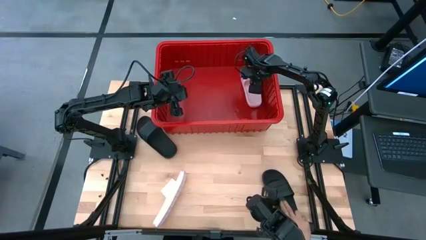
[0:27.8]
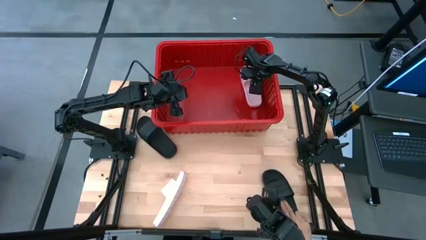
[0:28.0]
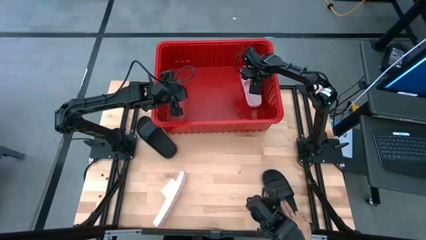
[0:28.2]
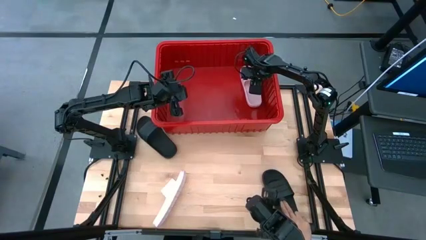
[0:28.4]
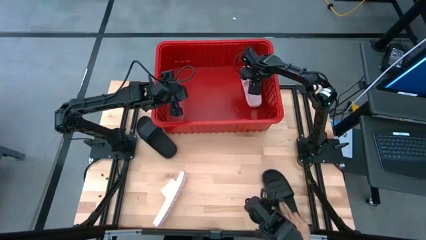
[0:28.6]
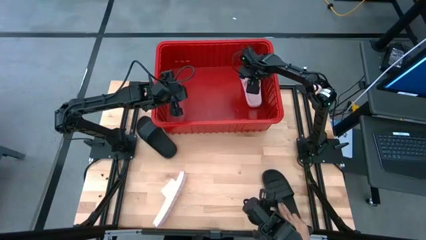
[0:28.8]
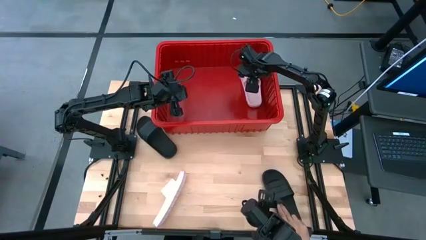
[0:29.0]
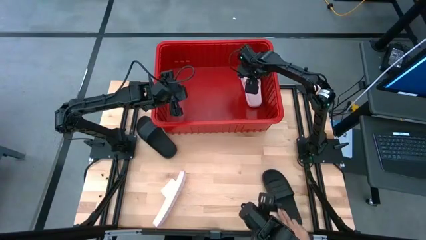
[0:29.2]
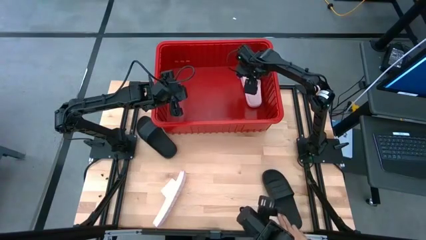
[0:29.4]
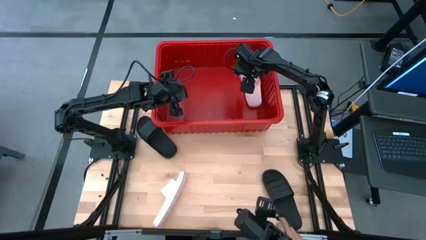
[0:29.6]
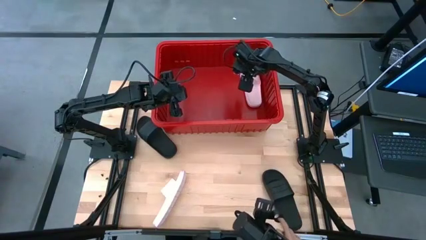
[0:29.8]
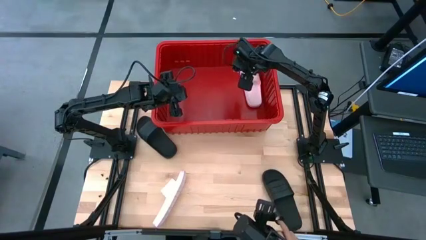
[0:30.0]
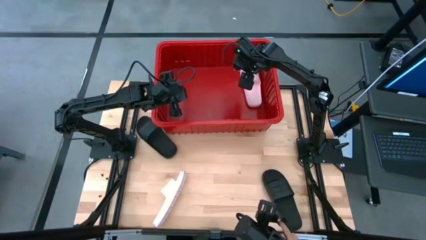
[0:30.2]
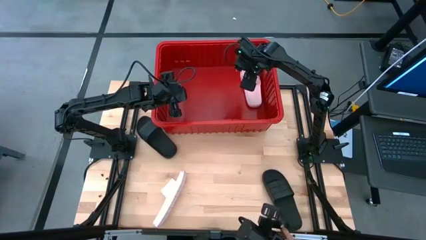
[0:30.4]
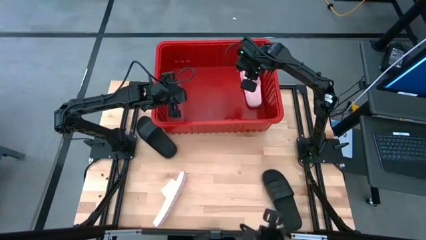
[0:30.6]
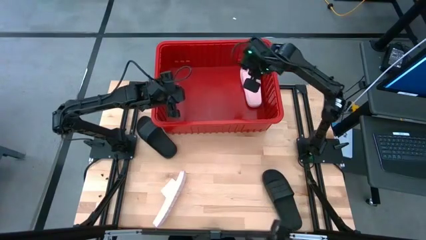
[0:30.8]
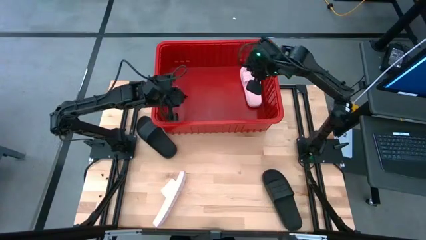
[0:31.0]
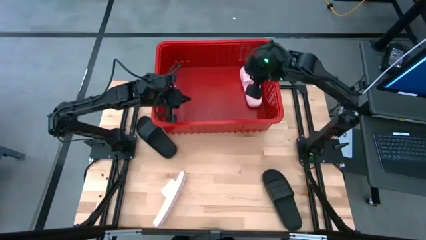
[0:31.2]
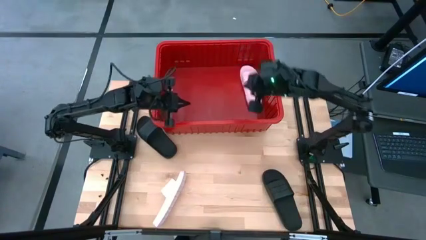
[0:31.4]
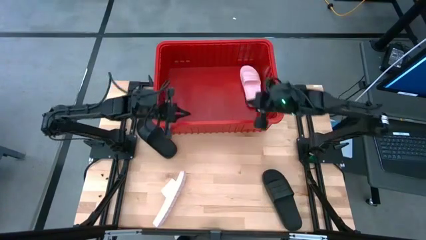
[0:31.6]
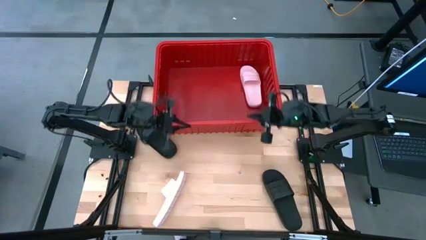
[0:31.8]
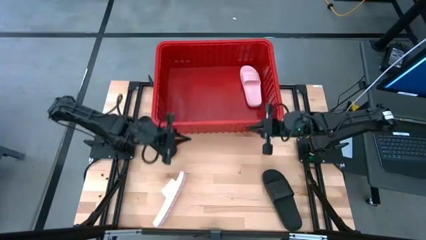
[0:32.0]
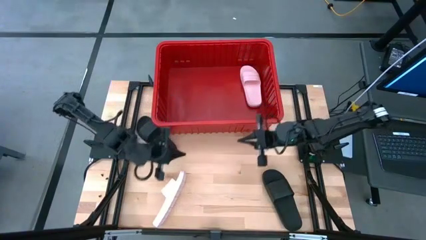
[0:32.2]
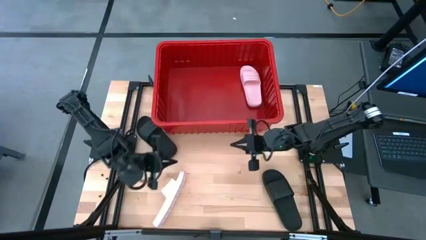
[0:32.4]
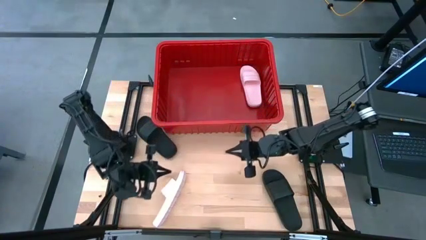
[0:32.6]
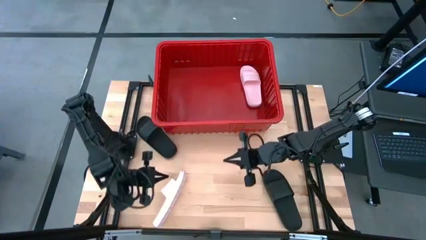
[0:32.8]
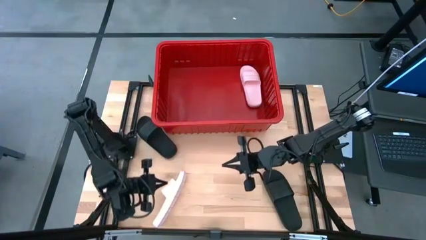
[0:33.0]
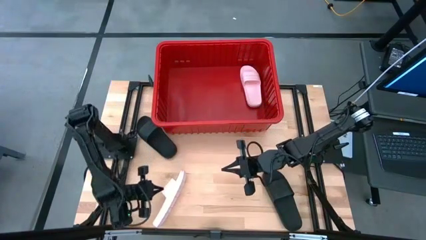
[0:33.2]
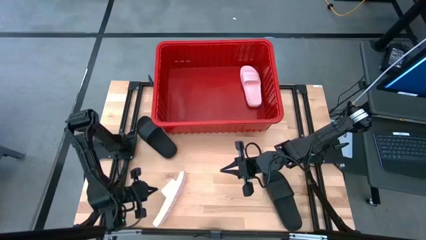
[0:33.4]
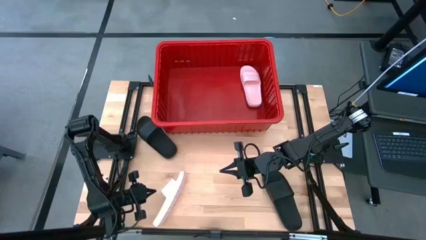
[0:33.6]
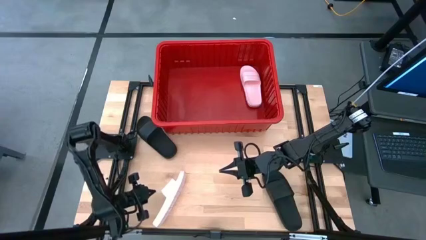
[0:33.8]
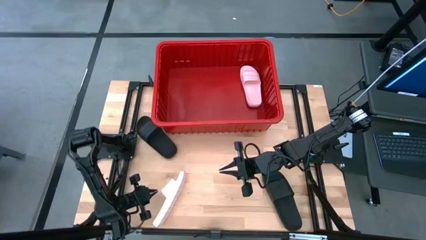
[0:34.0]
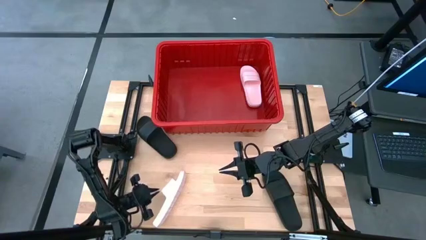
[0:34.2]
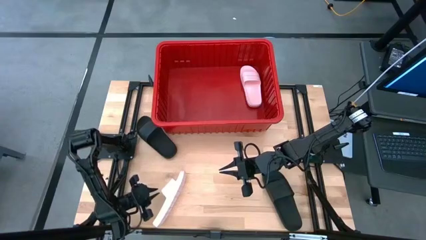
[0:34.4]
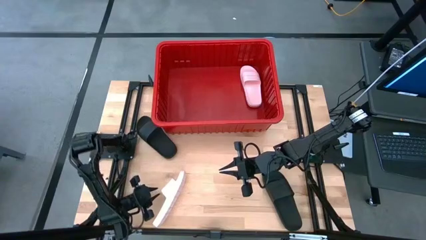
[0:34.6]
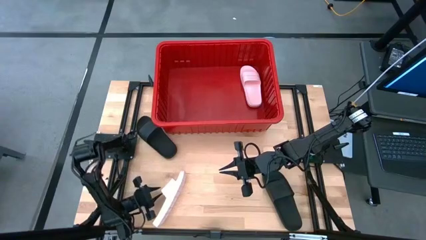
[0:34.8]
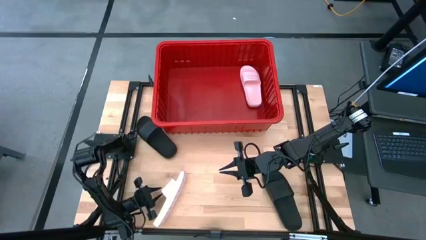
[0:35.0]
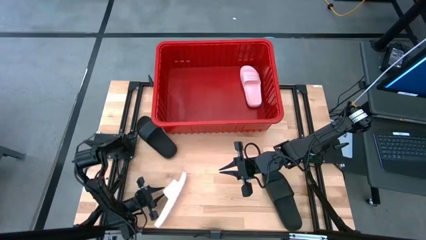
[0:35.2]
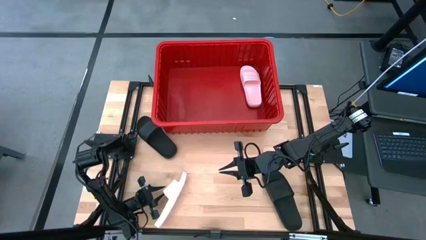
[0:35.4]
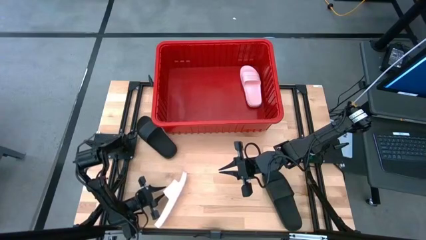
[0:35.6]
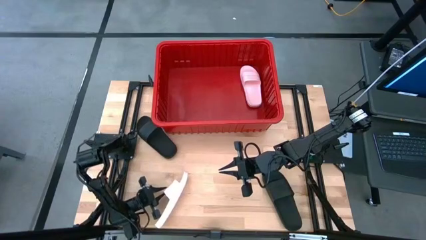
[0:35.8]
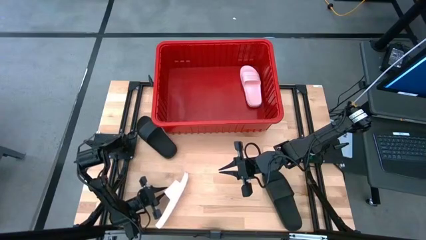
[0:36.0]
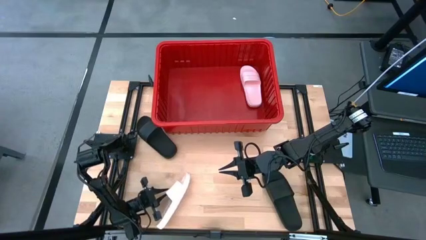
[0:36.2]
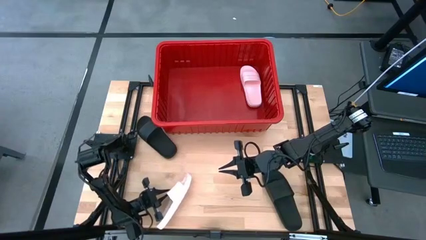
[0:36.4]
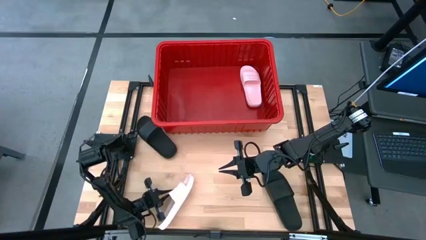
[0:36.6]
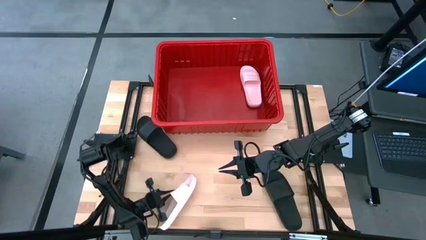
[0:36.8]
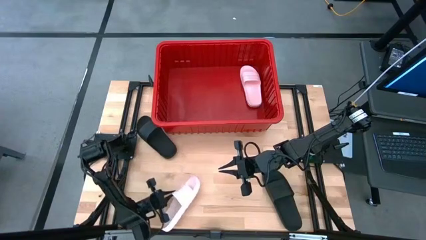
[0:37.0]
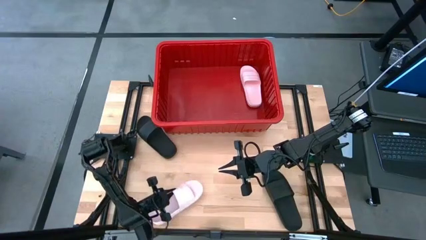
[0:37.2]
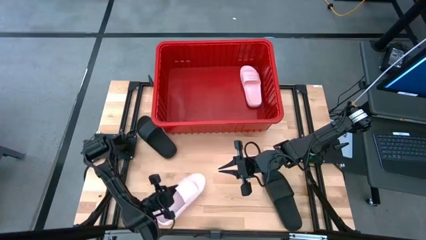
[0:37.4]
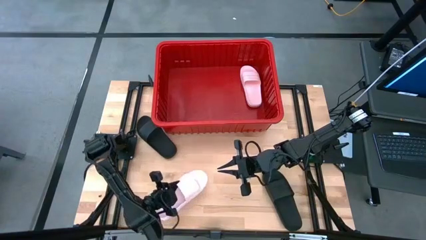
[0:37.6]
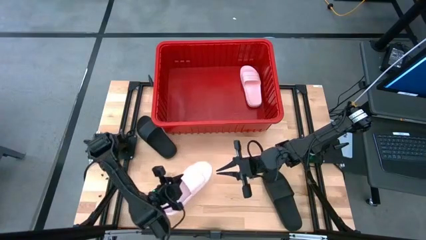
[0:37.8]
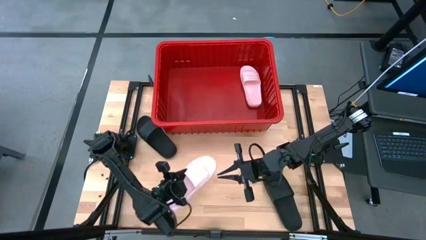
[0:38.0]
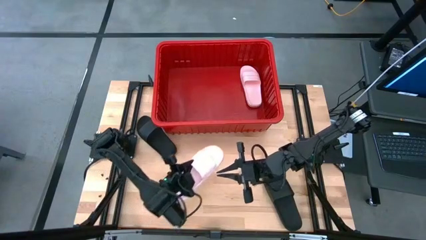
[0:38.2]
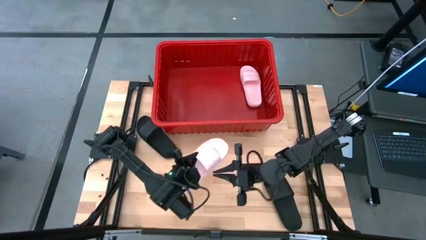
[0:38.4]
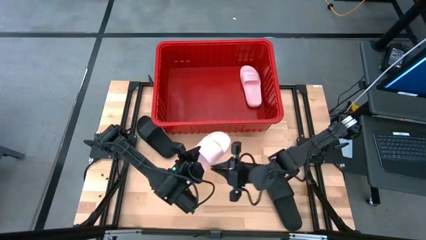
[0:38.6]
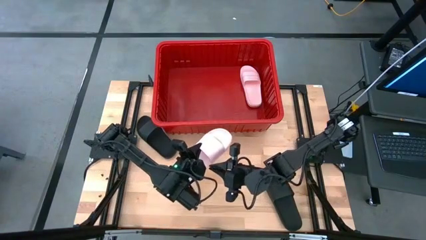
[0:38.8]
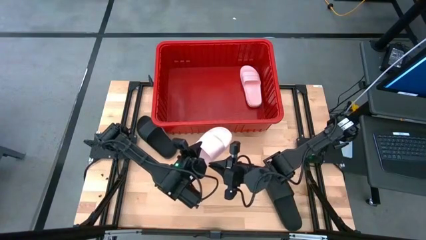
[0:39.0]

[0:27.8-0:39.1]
Task: Pick and place slides into bin
Put the pink slide into the red bin

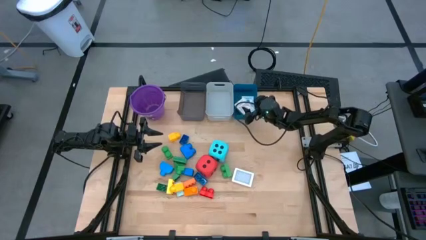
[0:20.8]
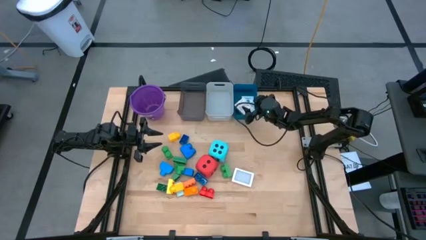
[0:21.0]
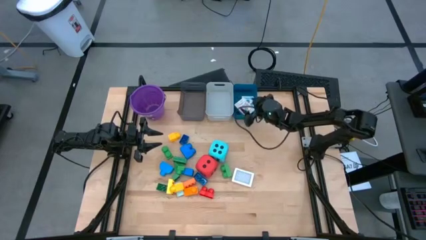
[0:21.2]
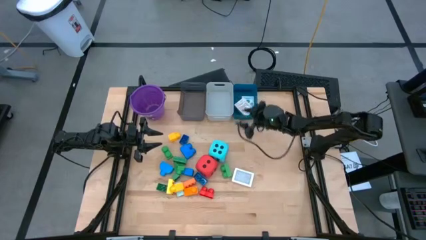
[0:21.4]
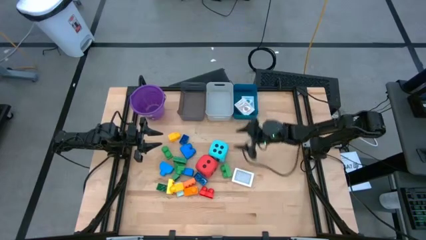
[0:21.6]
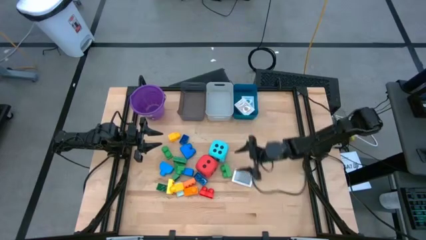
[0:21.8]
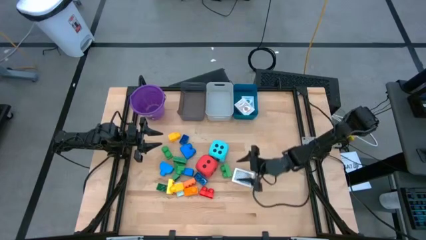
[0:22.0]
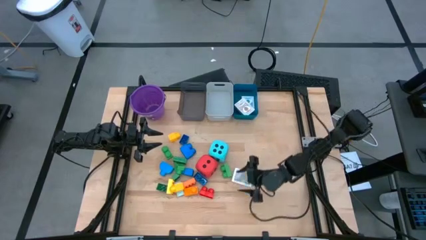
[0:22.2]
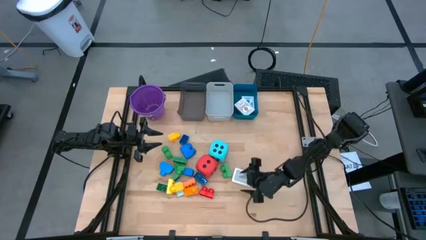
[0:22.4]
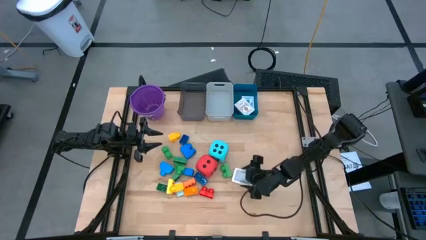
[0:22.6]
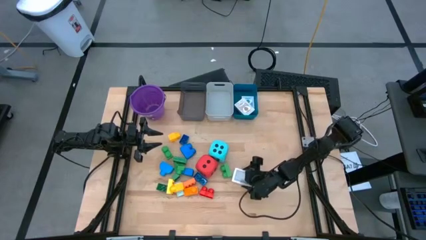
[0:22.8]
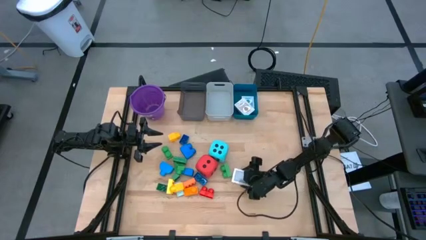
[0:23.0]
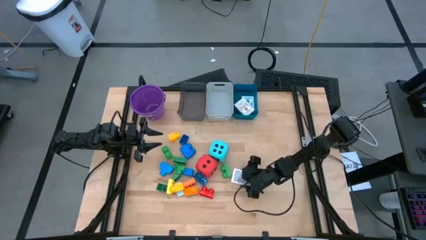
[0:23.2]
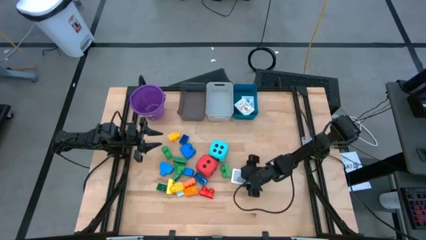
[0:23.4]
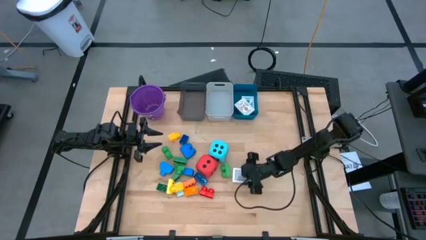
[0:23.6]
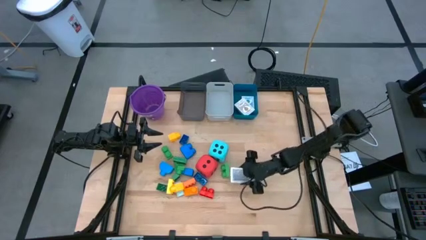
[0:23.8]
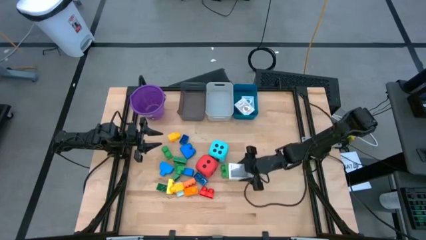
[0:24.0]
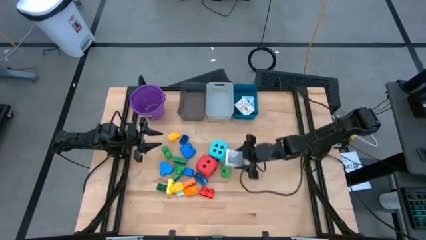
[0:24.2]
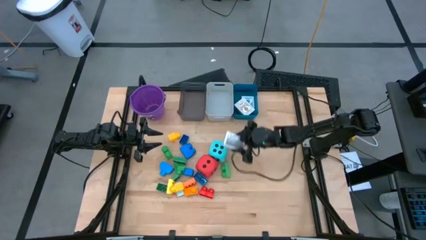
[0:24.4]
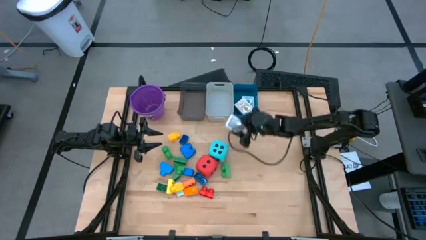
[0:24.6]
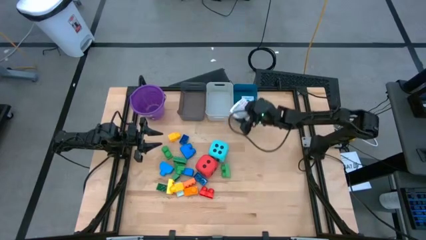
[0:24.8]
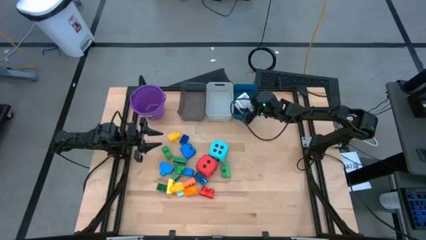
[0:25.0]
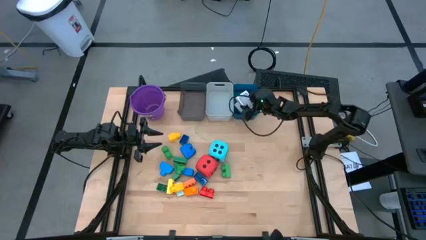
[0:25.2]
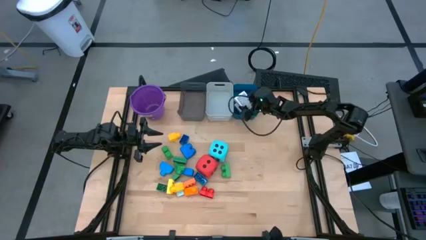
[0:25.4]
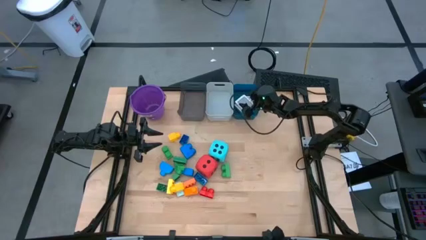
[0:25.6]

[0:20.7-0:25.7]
Task: Pick & Place Toys
Put the black deck of cards into the blue bin
